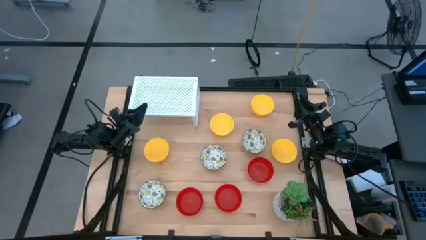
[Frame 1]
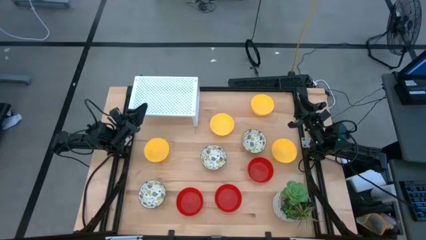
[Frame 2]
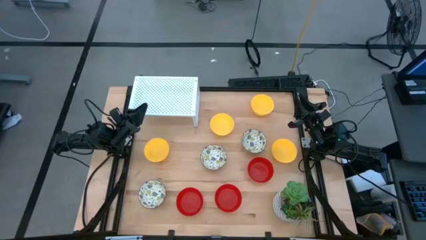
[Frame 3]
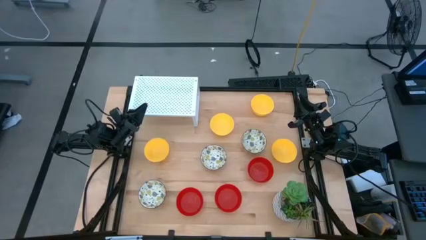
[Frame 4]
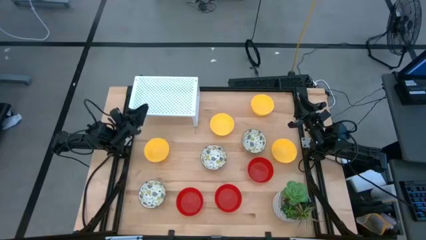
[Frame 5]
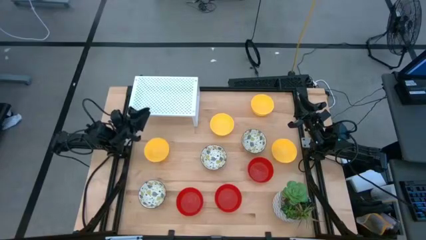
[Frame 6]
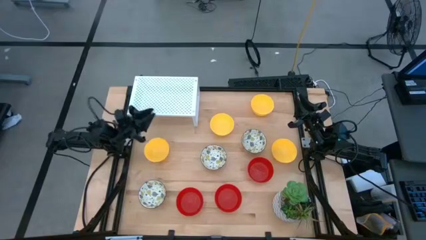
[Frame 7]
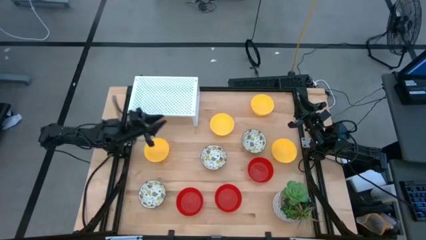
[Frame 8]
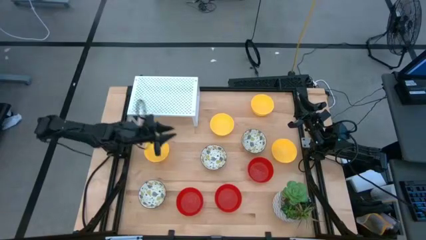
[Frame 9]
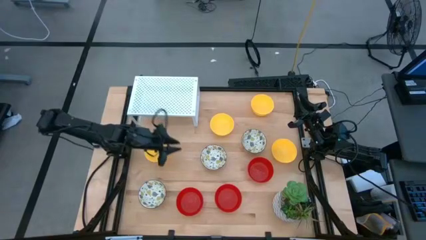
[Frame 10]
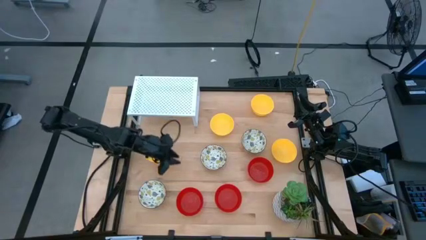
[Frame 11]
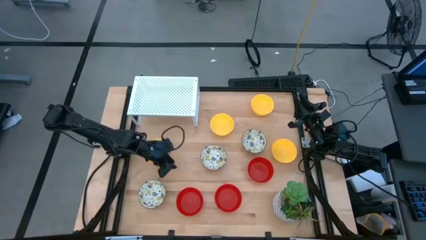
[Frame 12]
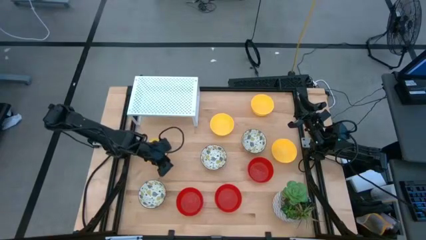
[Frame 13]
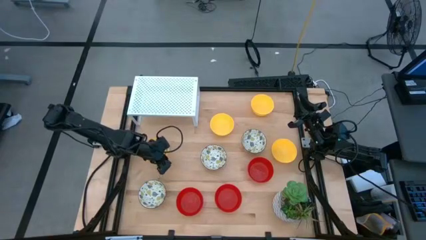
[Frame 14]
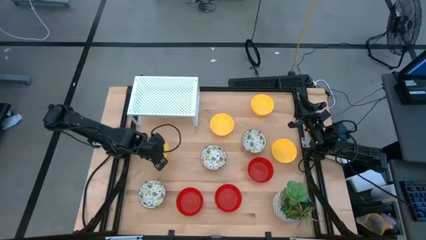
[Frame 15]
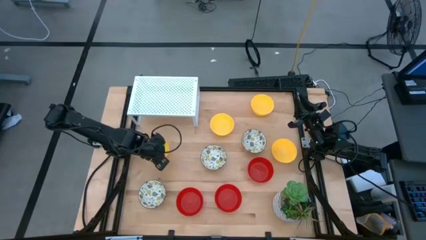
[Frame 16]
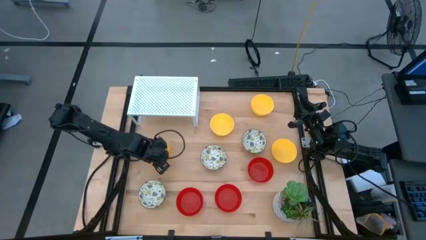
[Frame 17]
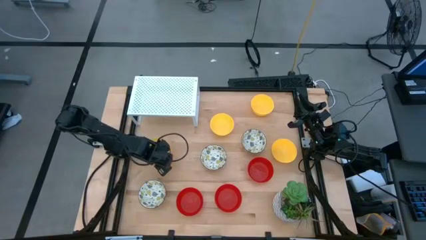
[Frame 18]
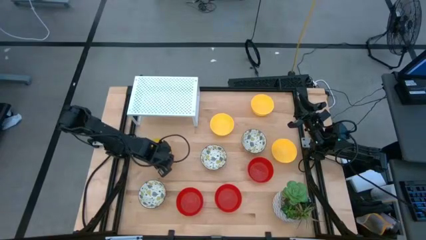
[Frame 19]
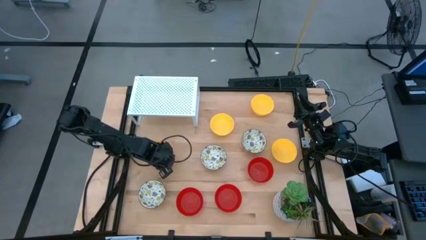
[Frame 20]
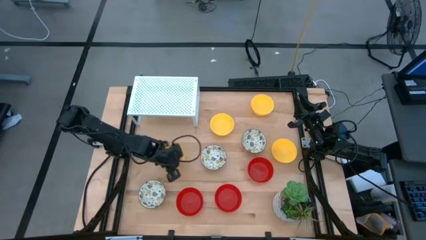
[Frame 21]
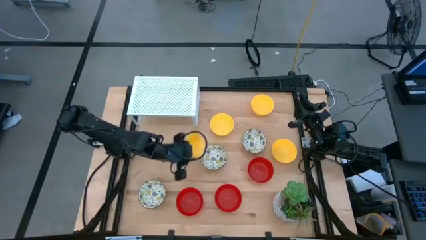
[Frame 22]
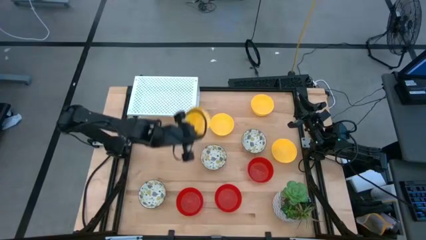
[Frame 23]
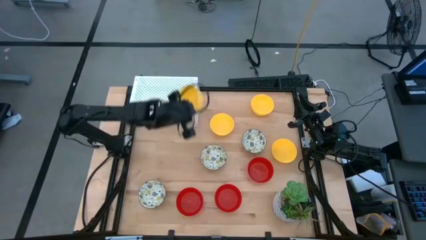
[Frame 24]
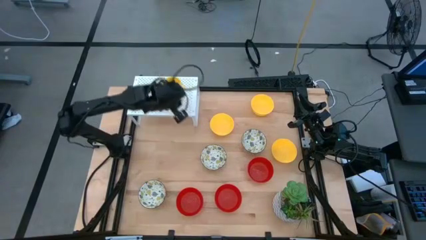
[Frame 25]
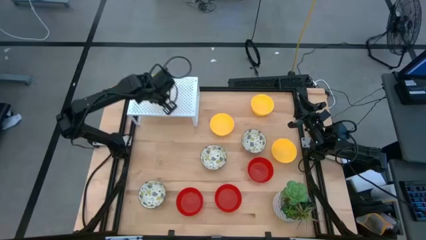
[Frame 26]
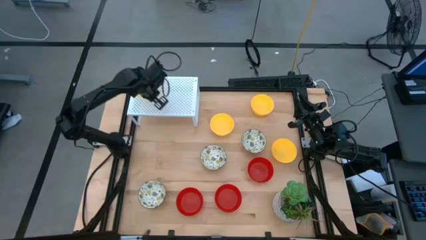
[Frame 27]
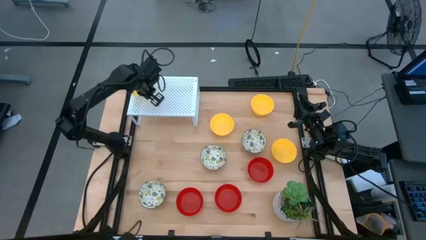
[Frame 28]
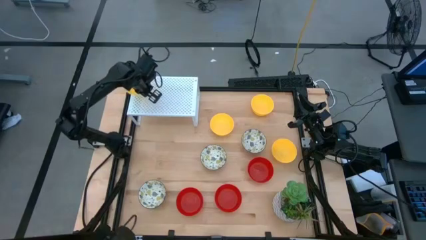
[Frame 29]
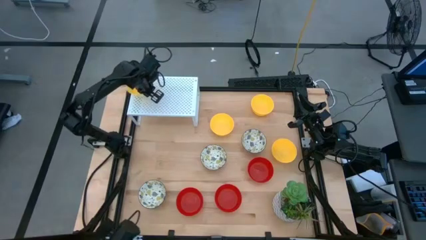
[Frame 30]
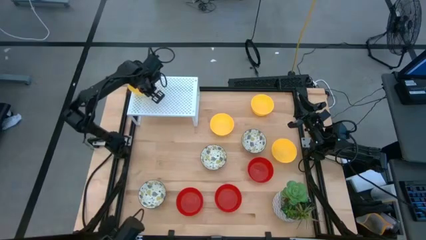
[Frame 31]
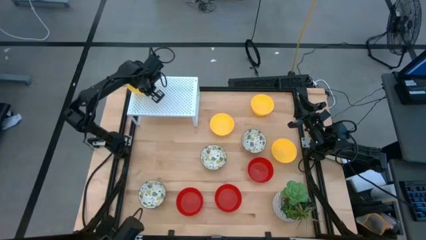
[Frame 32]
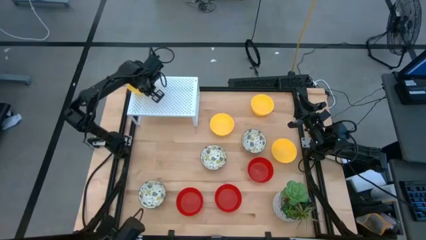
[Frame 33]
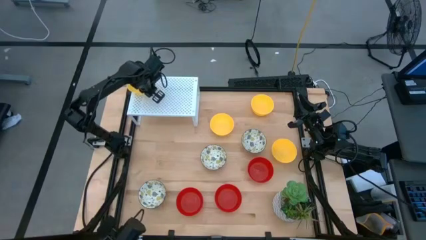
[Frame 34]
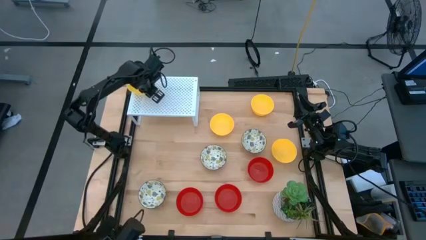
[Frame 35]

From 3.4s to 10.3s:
Task: Pick & Place Mini bowls
Put the yellow bowl on the shelf

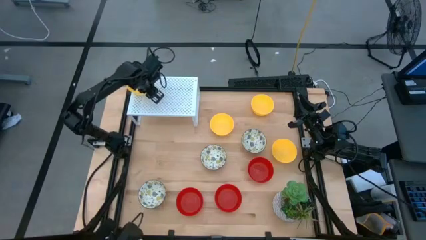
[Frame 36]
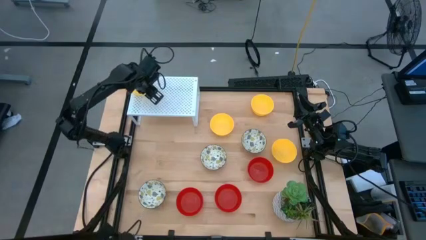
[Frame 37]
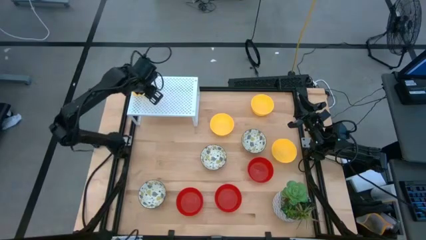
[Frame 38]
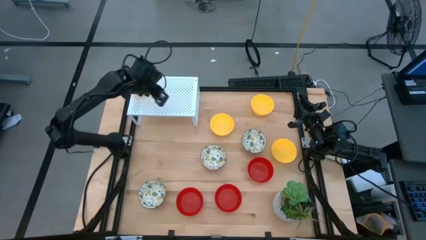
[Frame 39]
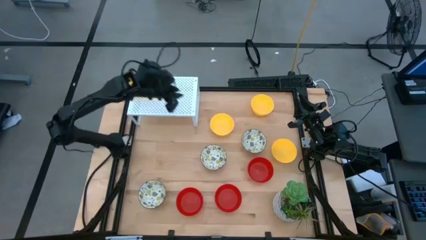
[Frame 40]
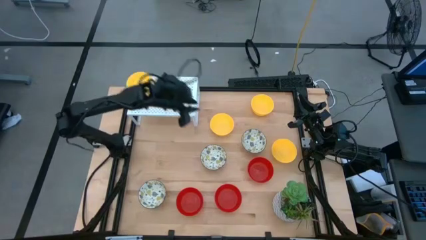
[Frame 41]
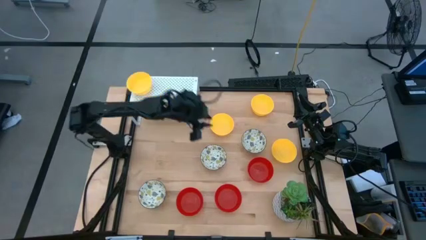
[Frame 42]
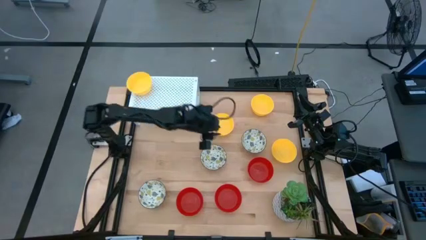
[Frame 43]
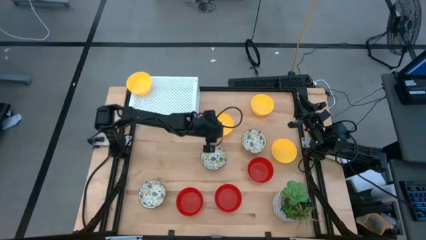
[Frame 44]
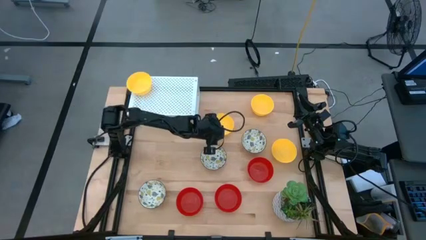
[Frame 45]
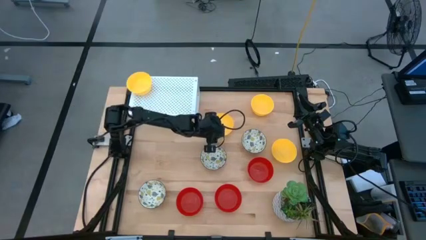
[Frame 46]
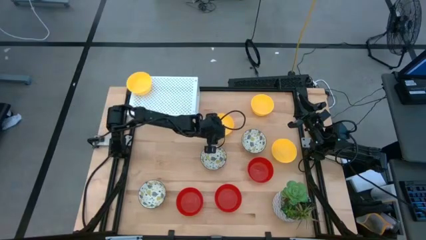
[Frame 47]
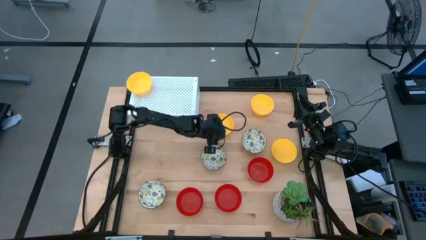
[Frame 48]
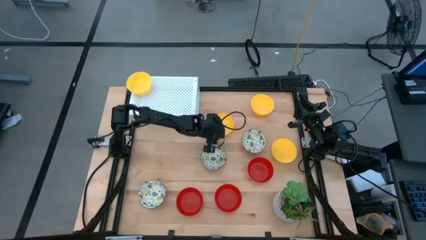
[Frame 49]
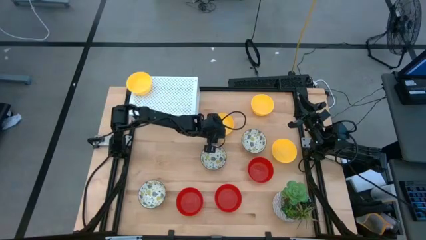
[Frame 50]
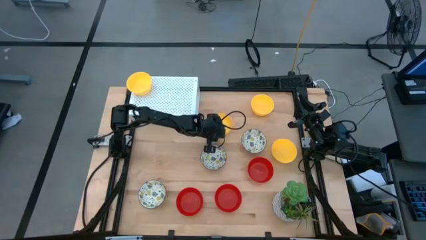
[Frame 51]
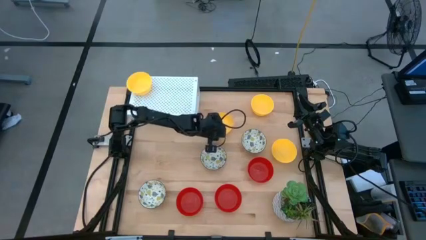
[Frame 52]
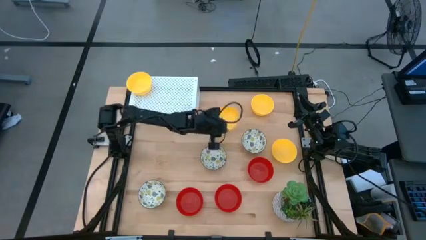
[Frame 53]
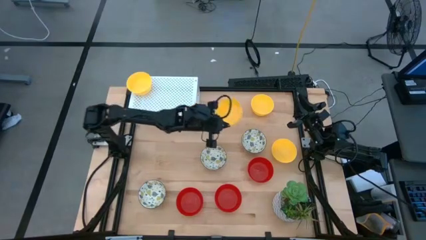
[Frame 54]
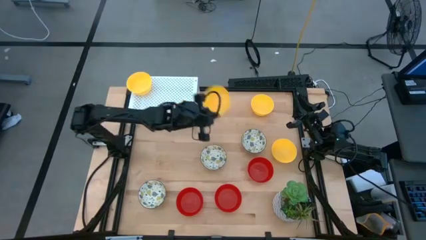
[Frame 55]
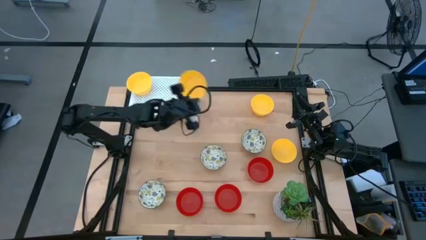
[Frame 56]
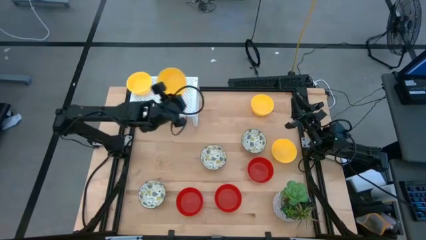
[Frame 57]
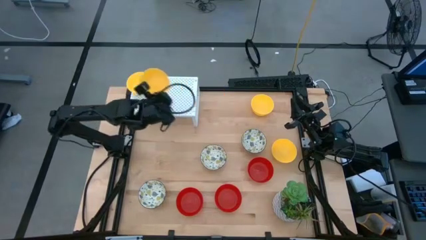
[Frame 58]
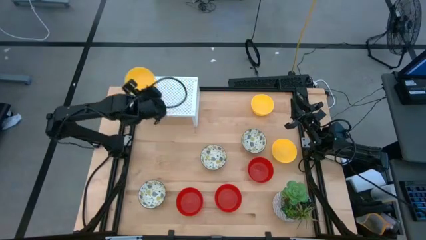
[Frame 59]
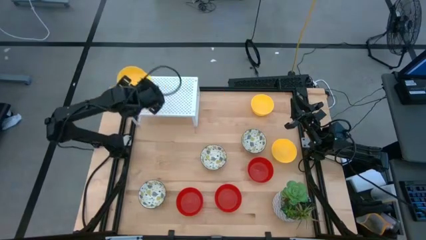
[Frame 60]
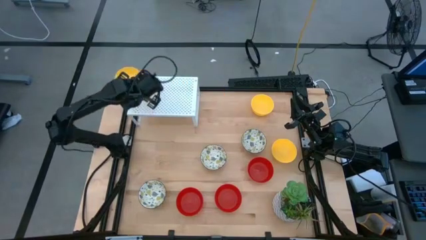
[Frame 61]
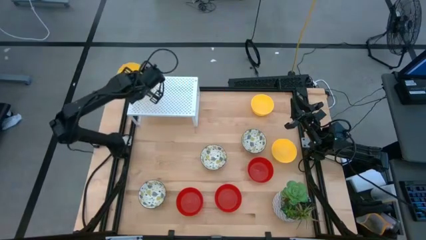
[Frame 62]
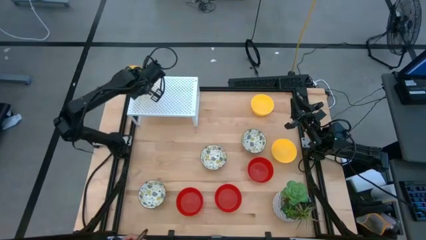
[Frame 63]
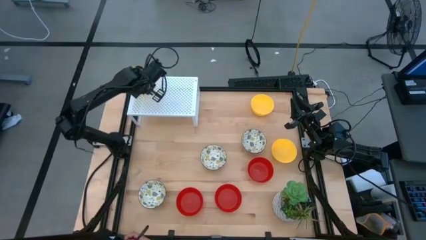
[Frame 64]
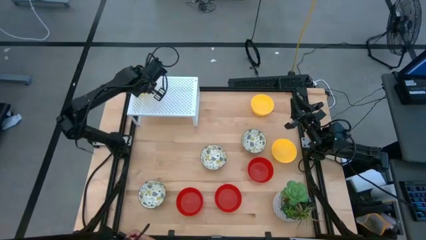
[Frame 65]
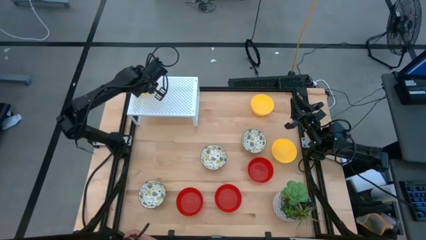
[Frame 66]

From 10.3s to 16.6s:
Stack the yellow bowl on top of the other yellow bowl on the shelf

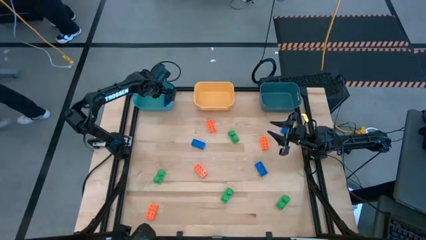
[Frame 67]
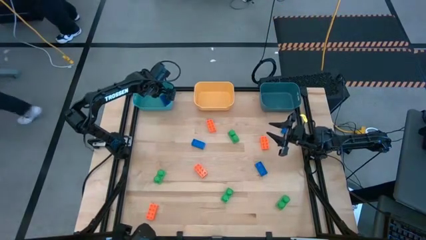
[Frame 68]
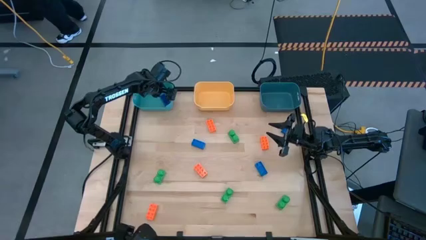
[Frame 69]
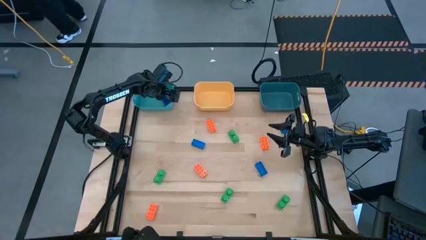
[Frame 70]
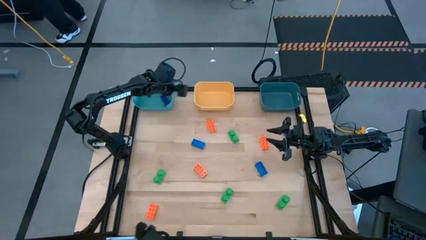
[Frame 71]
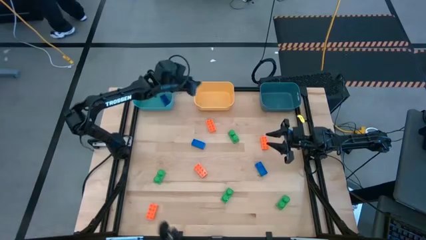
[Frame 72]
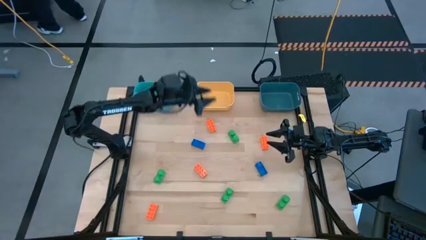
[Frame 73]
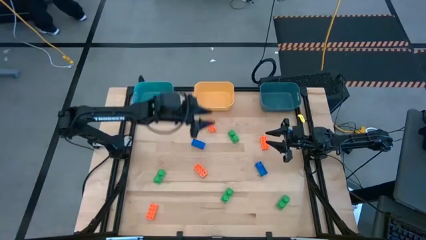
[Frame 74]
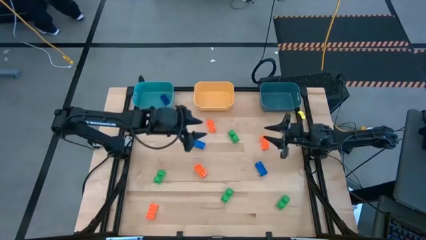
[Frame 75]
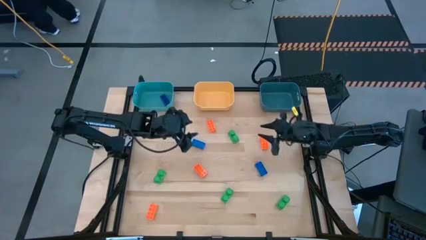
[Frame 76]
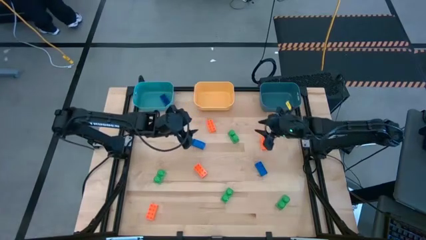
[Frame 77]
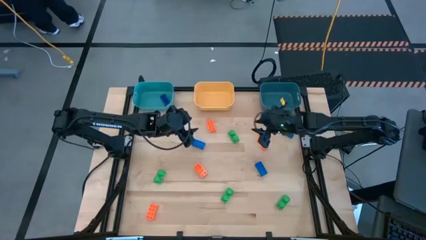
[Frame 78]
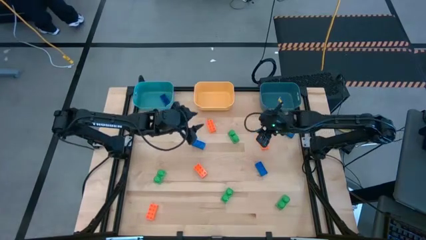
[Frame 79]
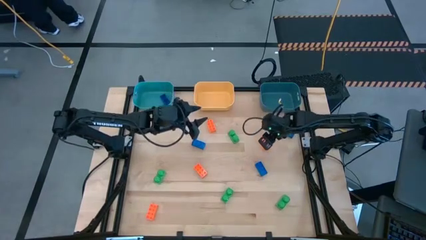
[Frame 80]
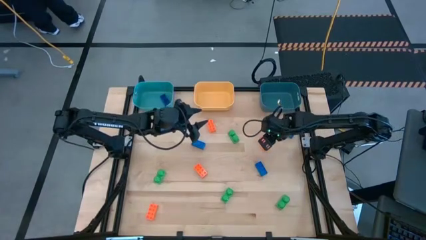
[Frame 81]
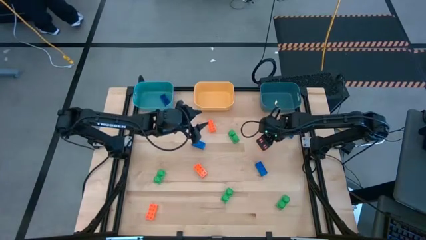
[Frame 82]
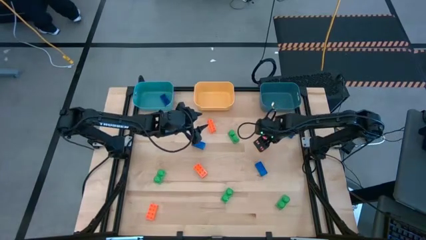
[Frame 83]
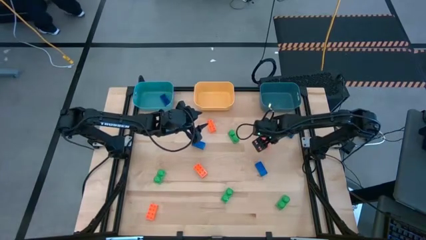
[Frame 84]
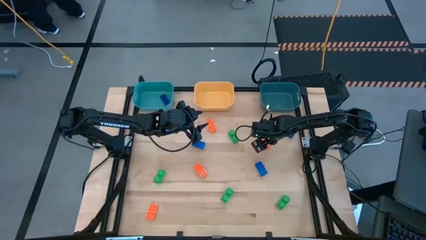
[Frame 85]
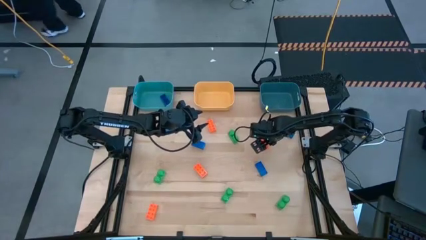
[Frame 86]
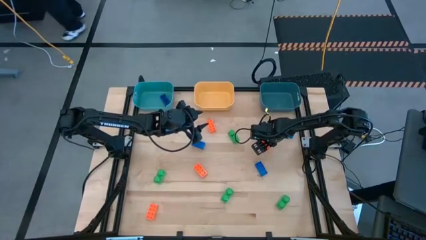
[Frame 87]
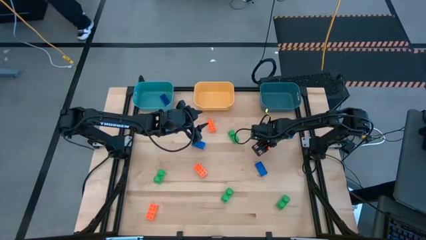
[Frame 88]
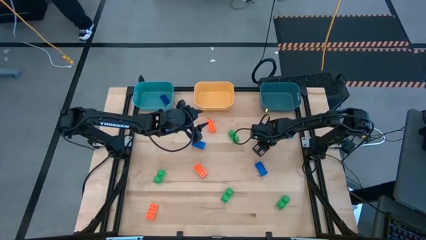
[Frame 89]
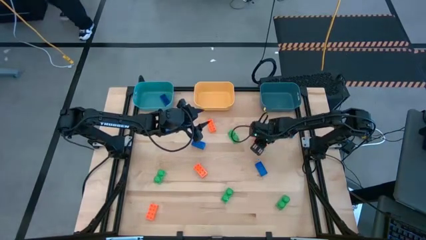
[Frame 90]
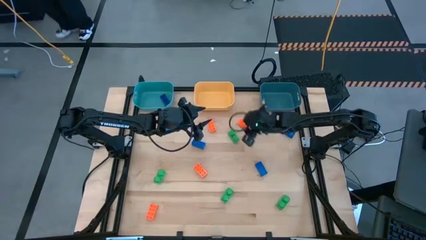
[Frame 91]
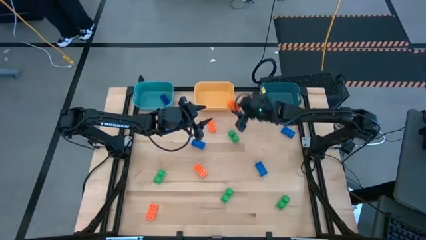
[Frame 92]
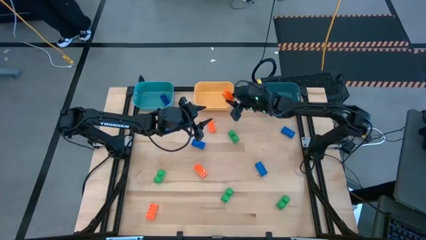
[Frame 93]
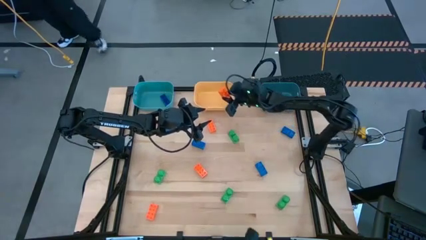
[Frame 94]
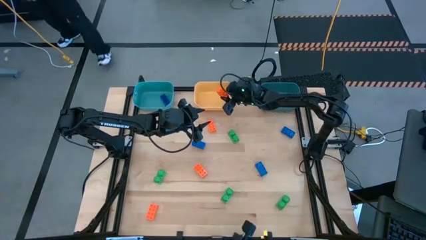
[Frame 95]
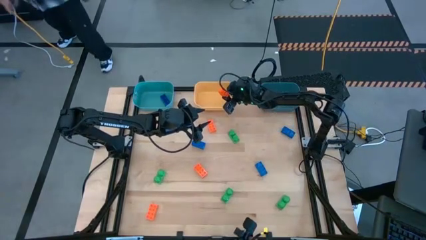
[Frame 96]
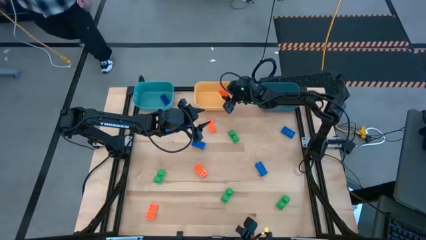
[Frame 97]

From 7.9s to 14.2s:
Task: Sort & place blocks by color
Put the orange game piece into the yellow bin
